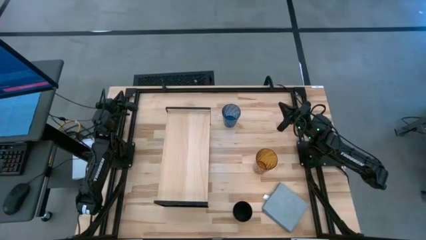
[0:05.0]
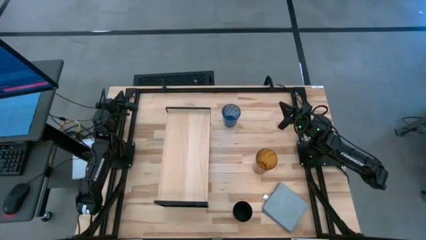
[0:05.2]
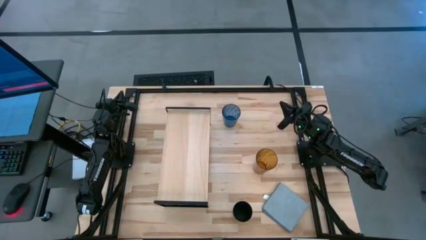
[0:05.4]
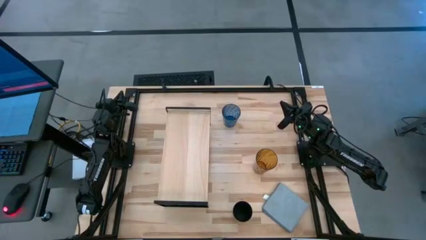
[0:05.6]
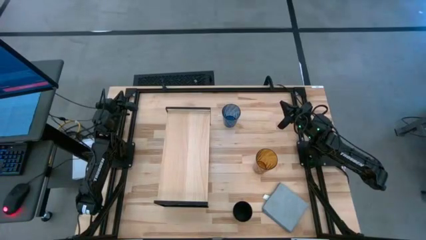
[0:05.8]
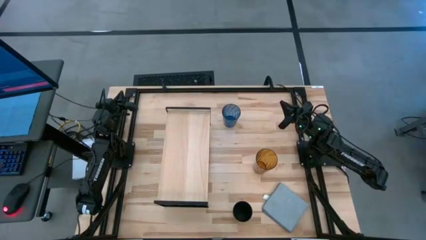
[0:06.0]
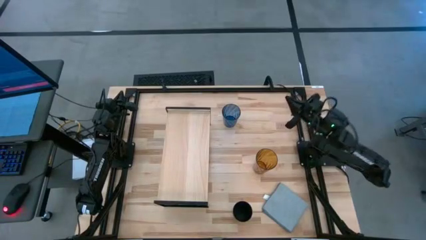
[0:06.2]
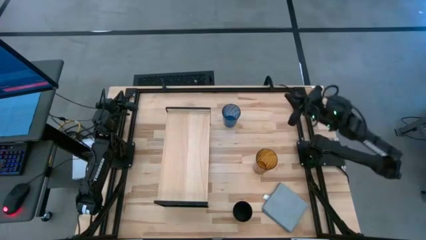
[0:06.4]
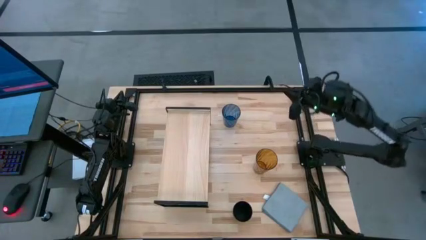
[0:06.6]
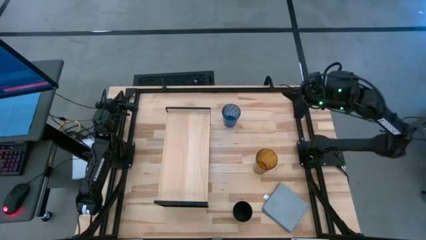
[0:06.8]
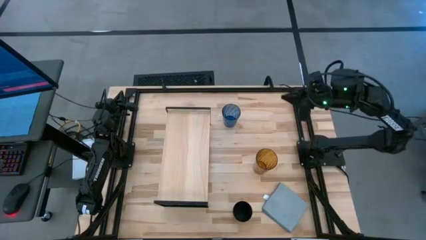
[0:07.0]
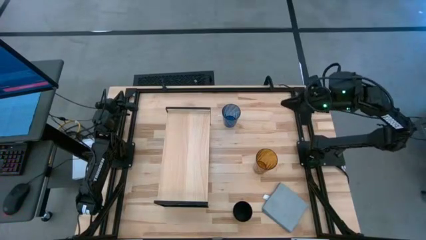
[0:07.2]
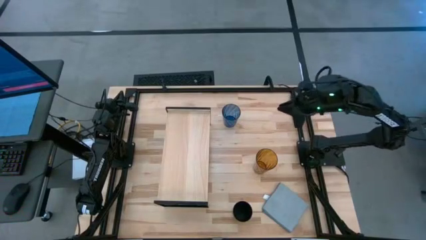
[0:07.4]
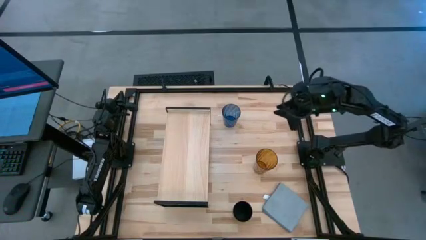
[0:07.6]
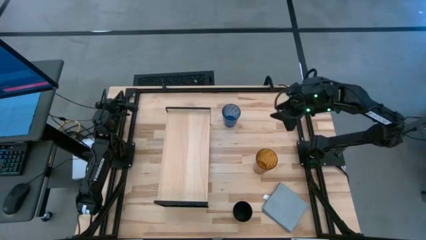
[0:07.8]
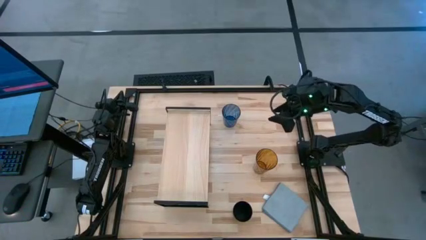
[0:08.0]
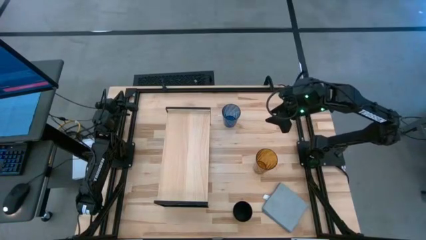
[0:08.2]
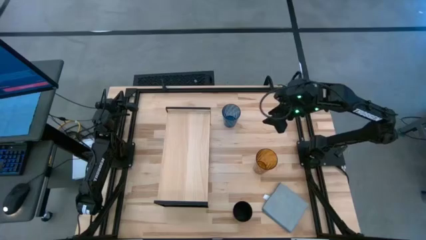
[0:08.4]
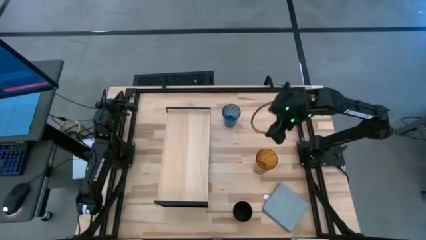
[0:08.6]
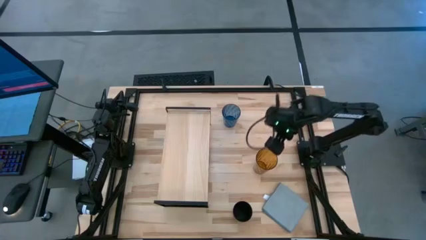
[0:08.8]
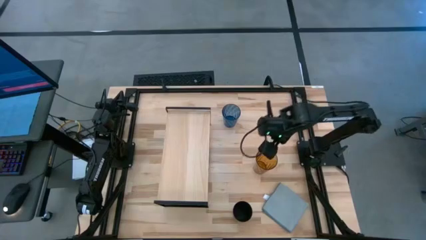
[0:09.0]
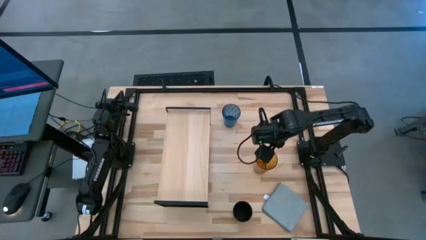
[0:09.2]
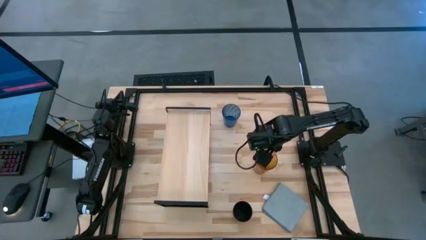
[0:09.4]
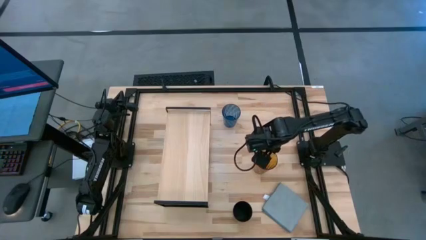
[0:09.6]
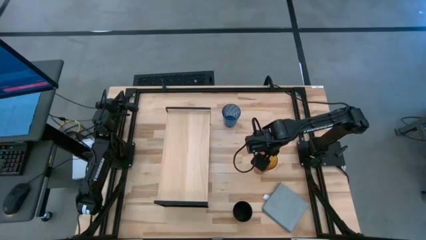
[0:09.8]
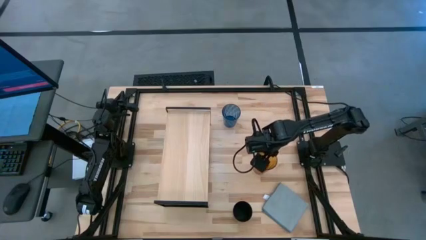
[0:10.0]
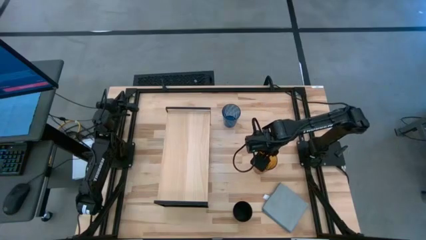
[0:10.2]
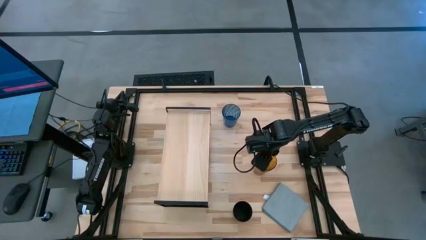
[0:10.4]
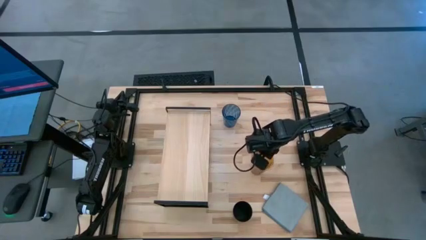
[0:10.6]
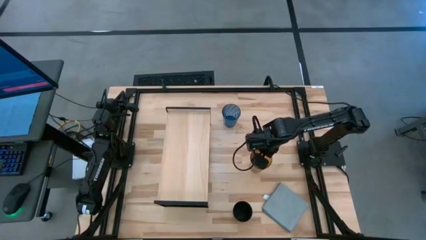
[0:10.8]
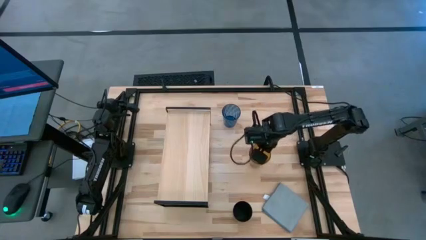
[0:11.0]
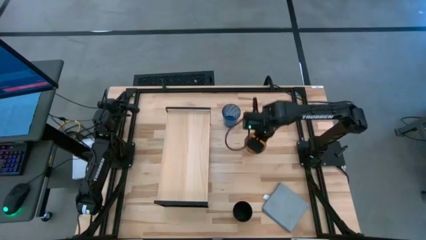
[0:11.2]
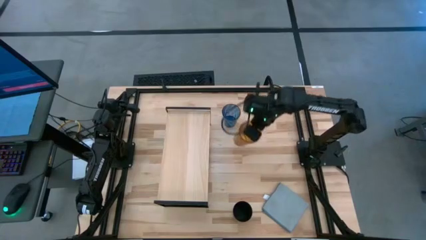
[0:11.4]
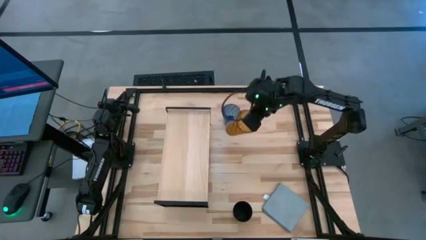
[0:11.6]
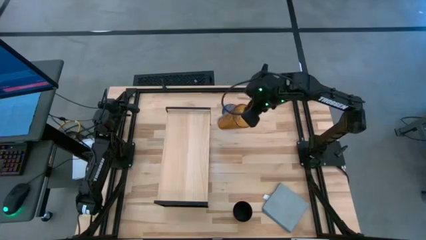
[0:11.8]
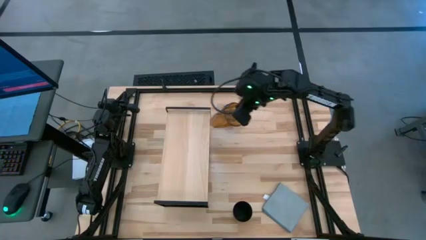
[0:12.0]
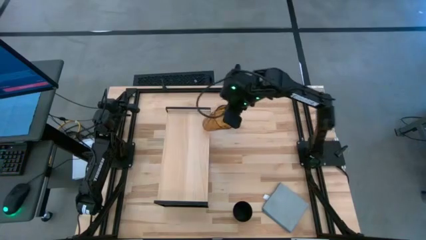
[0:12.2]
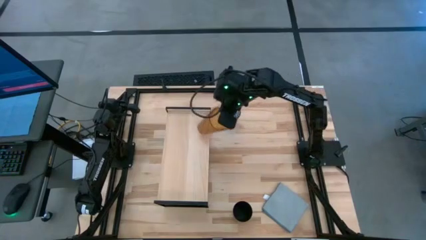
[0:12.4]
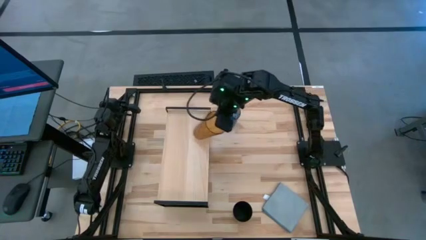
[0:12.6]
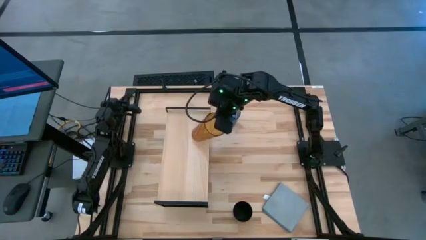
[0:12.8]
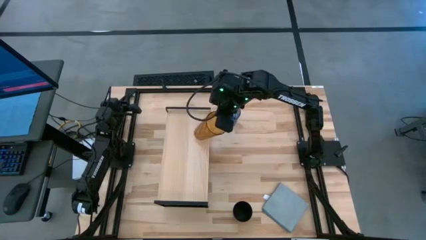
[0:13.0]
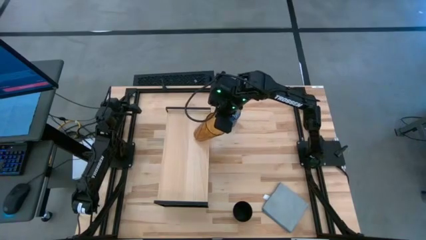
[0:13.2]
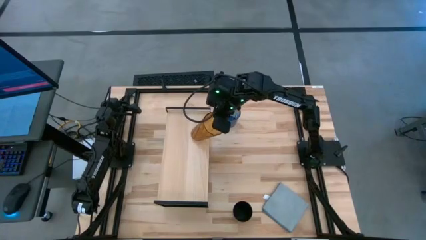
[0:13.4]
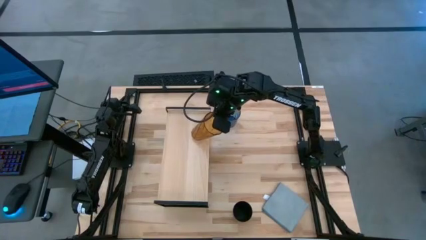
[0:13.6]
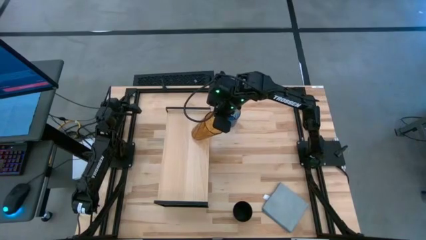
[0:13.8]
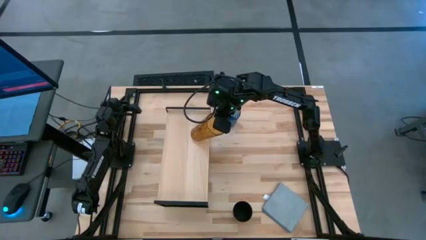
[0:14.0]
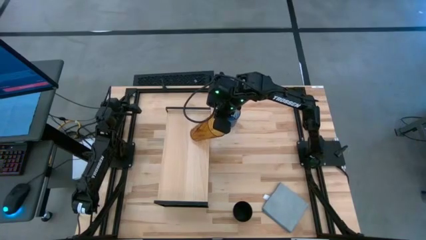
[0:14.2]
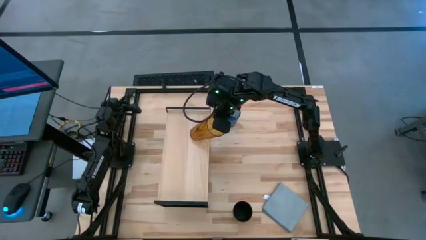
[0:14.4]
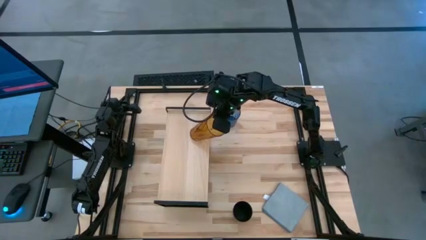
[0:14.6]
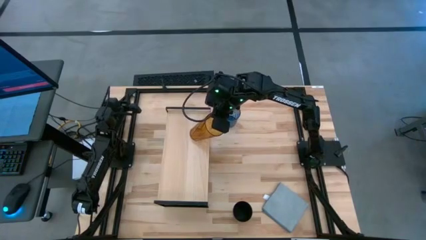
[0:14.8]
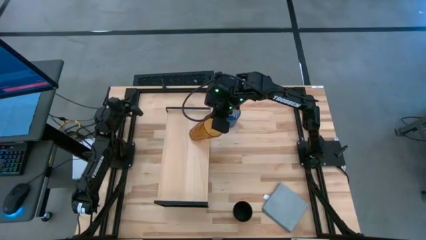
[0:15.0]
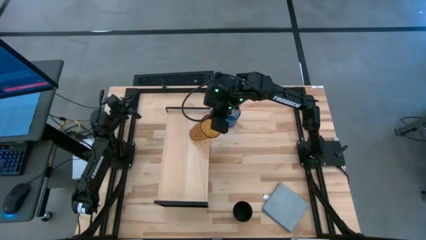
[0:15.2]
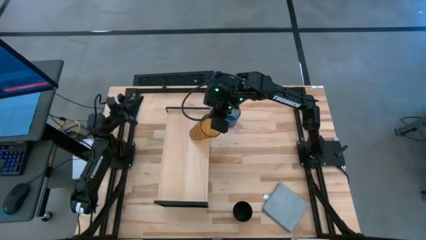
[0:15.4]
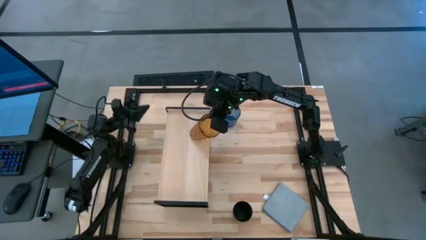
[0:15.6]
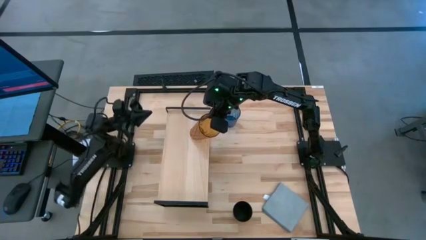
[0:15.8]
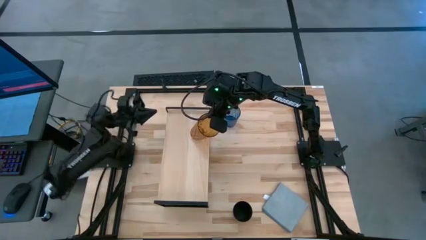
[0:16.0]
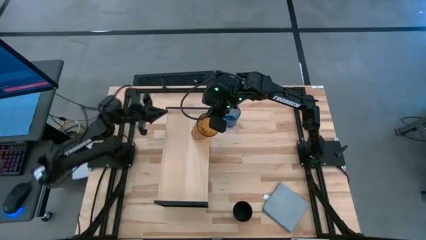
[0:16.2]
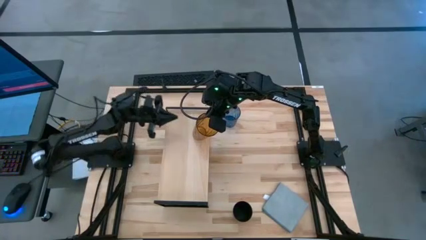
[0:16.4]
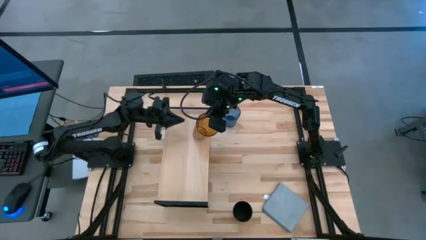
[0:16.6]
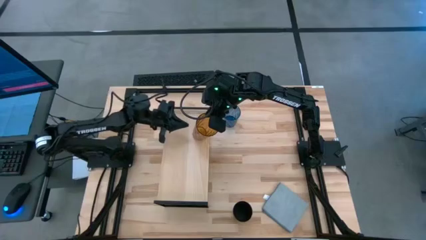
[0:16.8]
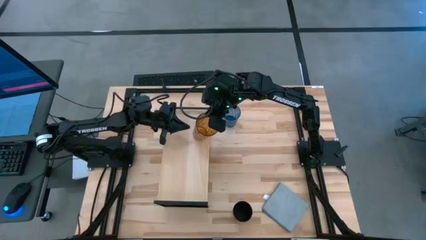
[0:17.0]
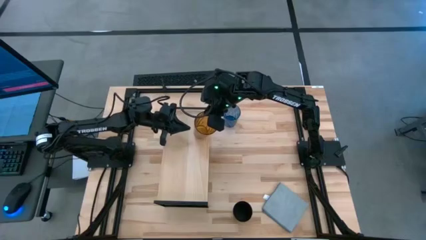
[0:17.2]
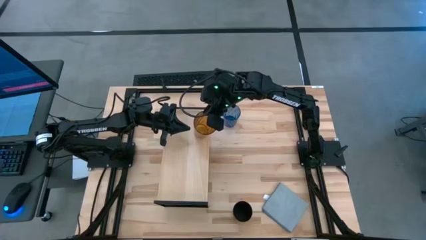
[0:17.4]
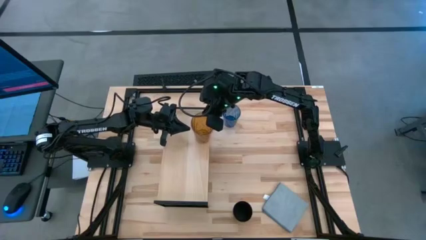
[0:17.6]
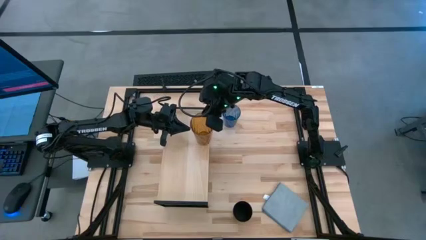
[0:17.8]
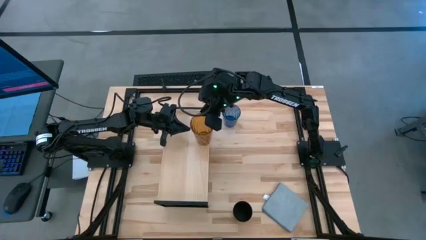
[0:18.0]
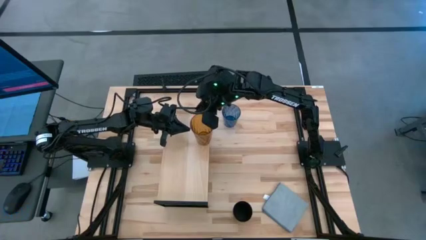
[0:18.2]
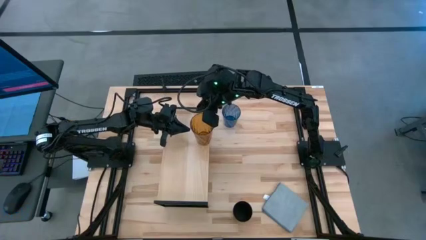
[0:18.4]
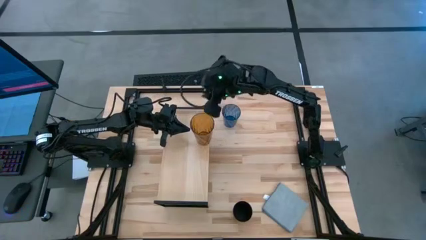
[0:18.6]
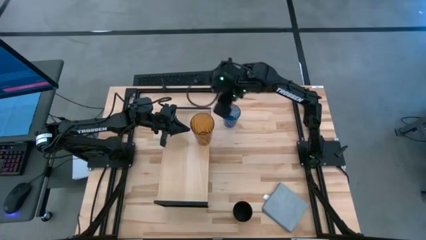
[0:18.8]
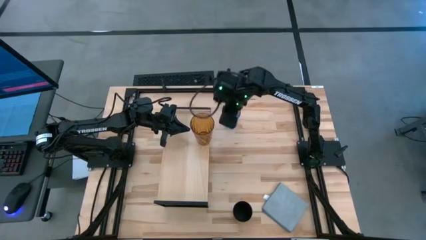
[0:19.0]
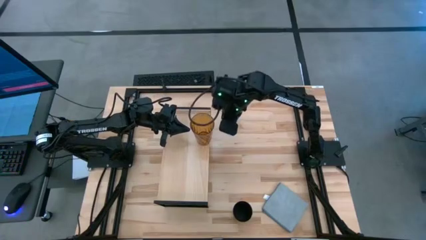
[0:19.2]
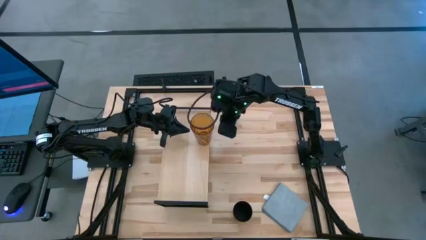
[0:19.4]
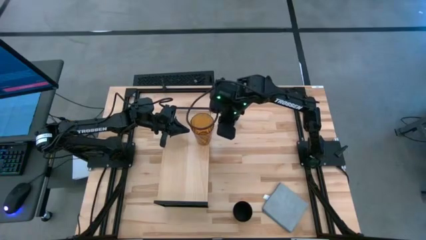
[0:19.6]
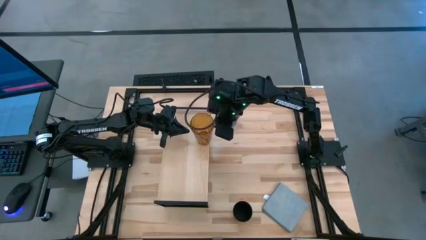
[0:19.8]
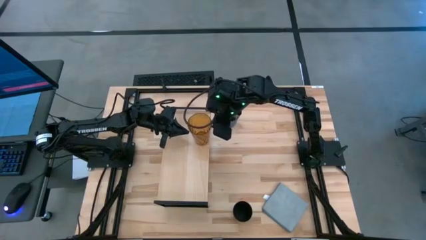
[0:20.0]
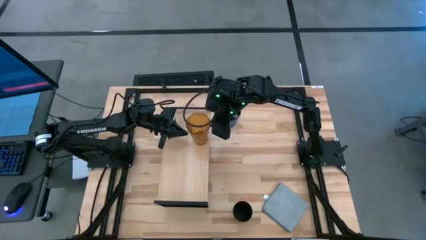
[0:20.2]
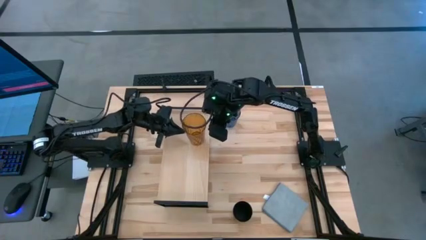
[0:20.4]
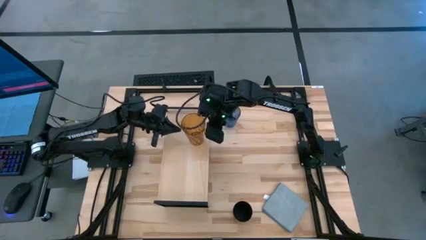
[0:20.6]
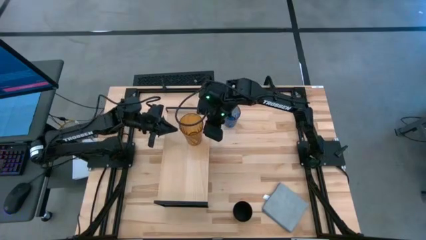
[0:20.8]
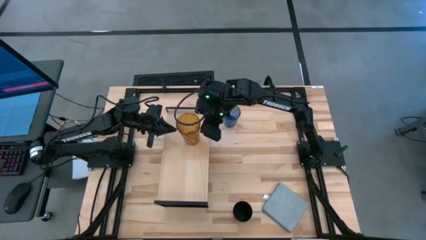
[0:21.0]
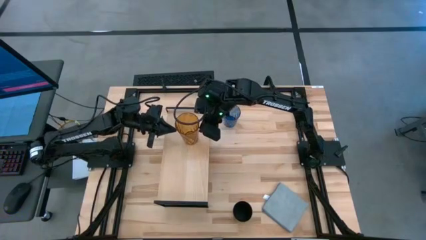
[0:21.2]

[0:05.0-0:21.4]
Task: Stack small to large cups/mugs on shelf
Put the brown cup on the shelf
